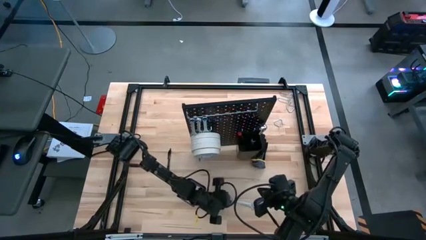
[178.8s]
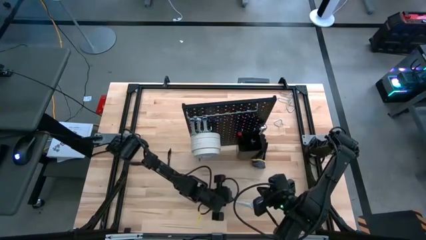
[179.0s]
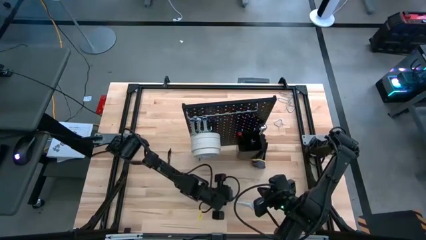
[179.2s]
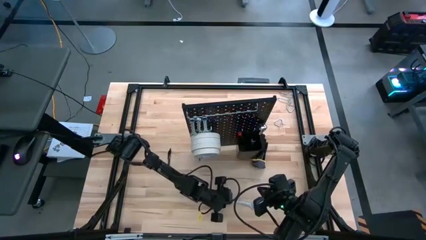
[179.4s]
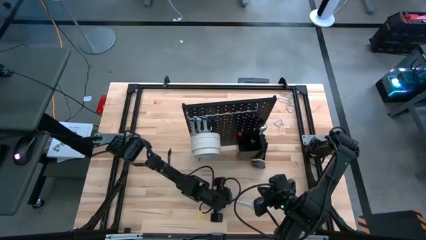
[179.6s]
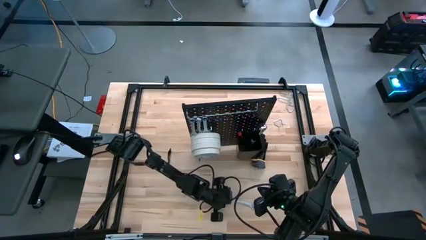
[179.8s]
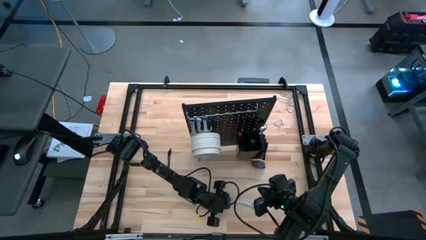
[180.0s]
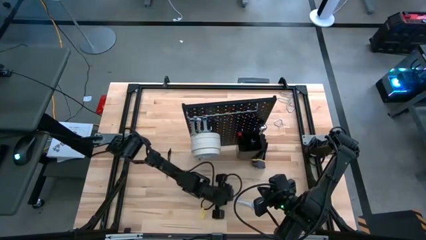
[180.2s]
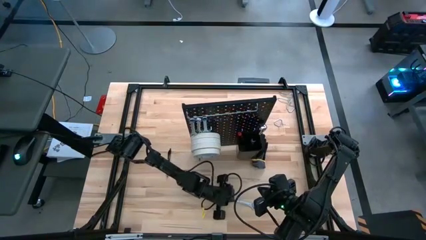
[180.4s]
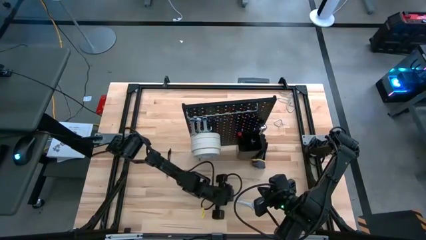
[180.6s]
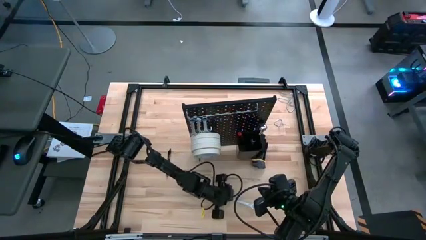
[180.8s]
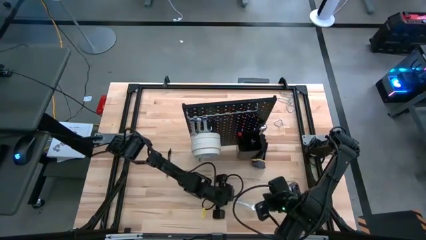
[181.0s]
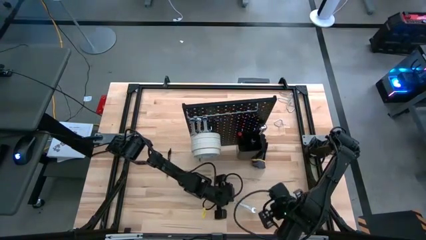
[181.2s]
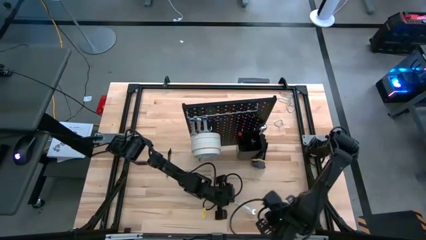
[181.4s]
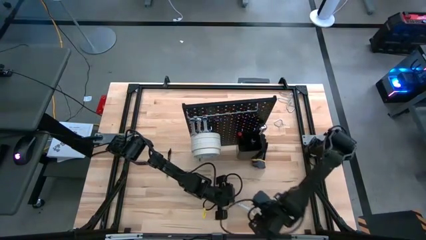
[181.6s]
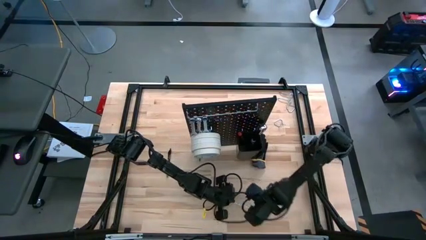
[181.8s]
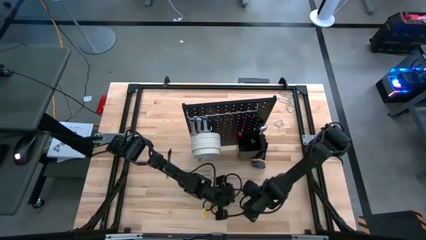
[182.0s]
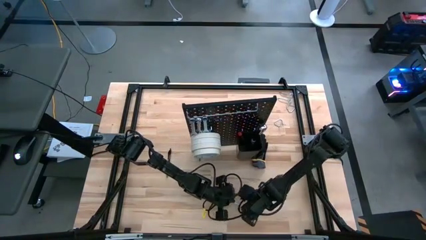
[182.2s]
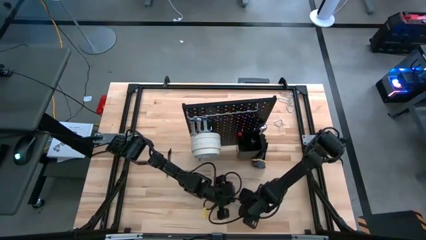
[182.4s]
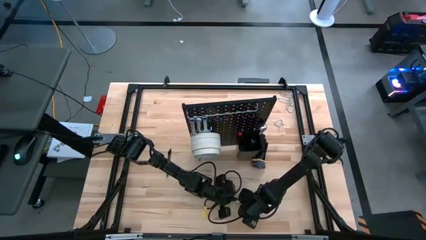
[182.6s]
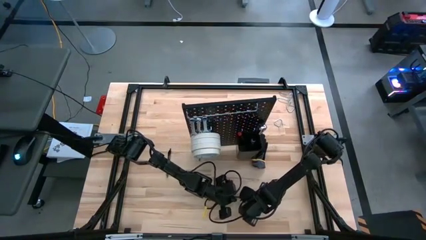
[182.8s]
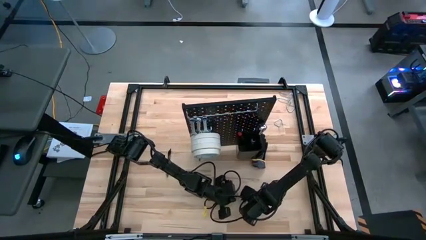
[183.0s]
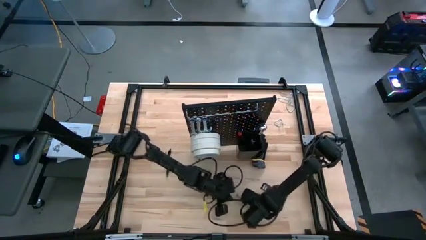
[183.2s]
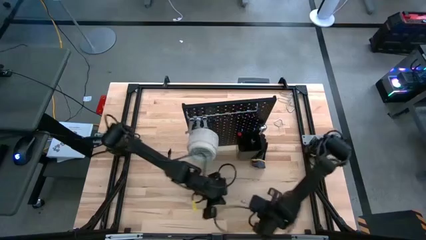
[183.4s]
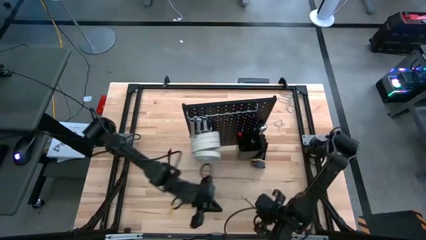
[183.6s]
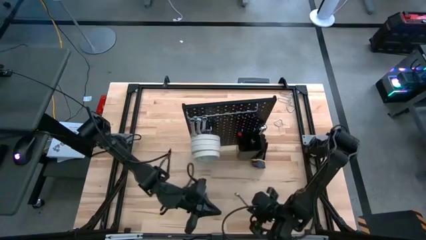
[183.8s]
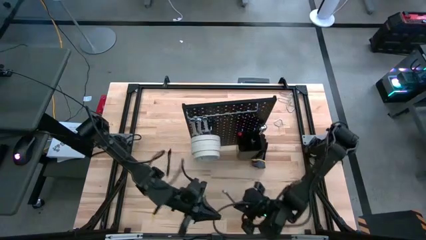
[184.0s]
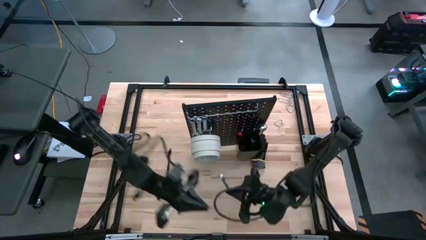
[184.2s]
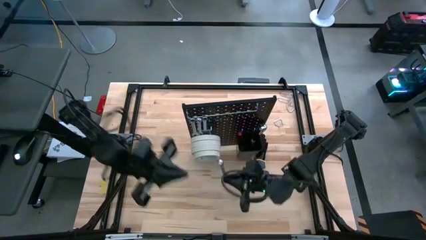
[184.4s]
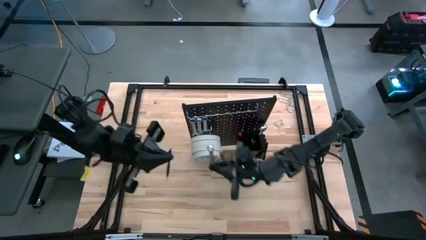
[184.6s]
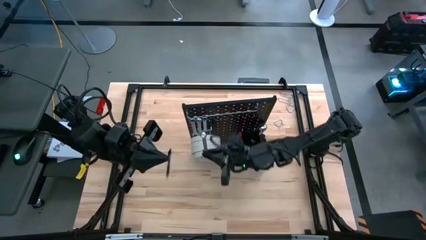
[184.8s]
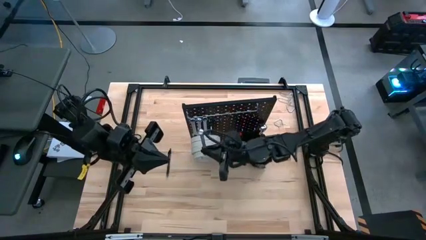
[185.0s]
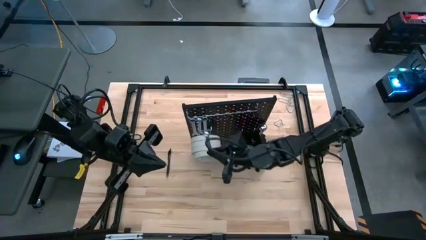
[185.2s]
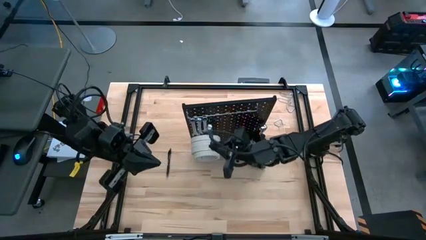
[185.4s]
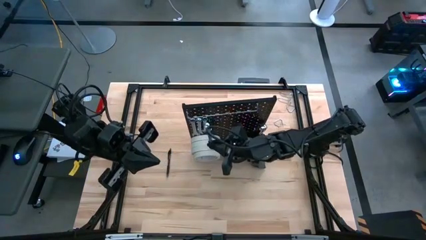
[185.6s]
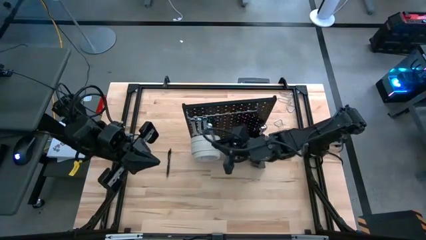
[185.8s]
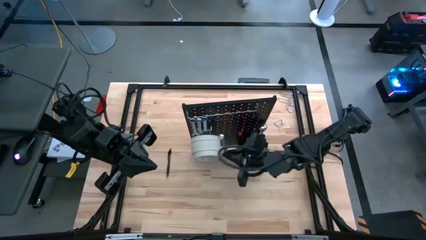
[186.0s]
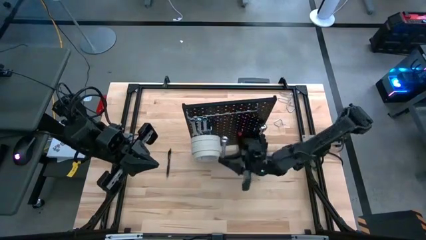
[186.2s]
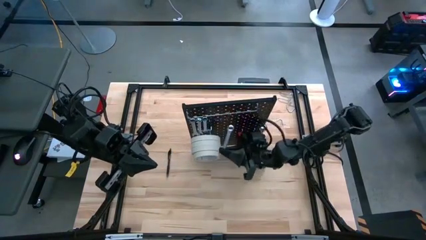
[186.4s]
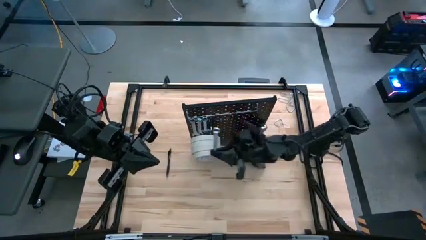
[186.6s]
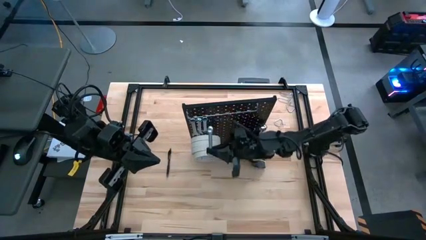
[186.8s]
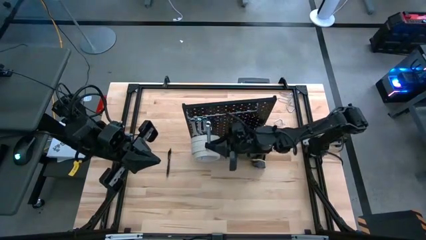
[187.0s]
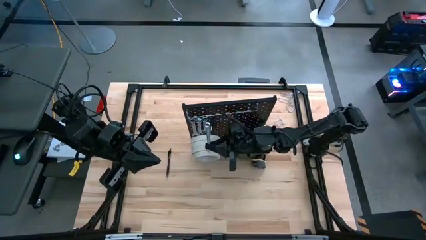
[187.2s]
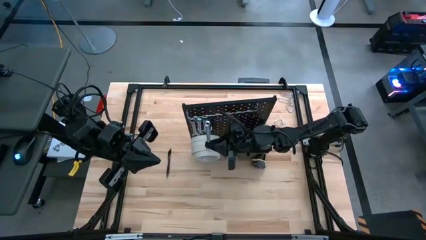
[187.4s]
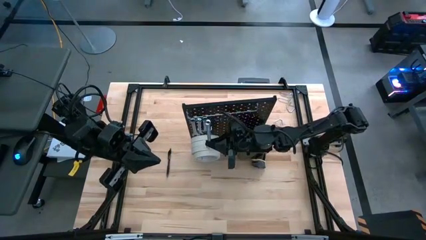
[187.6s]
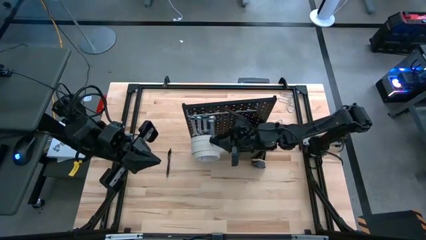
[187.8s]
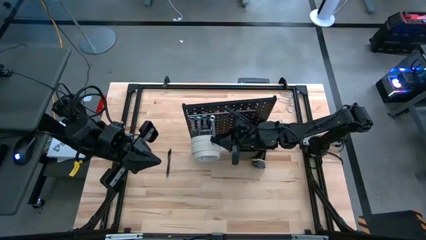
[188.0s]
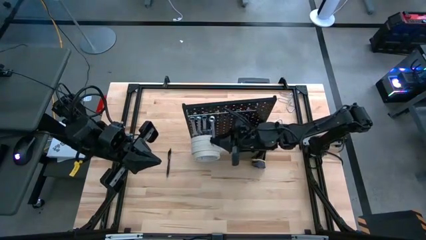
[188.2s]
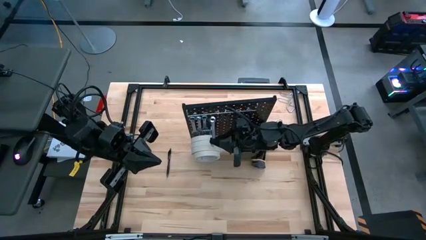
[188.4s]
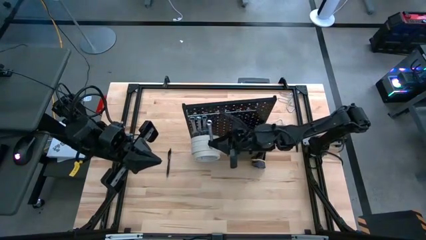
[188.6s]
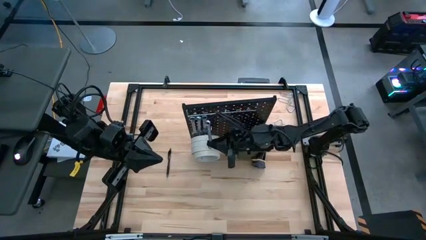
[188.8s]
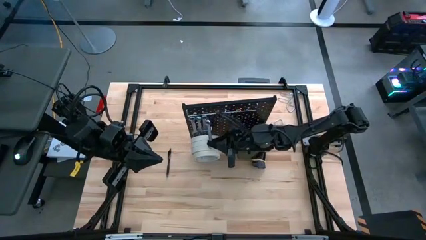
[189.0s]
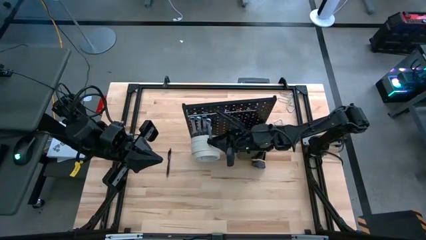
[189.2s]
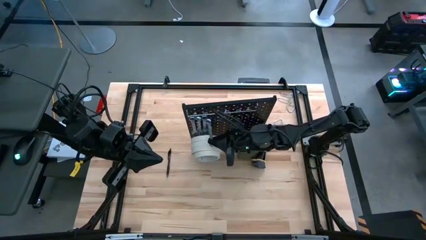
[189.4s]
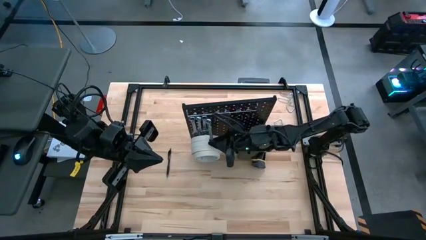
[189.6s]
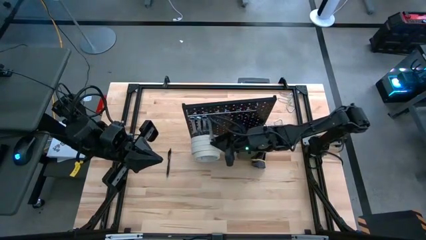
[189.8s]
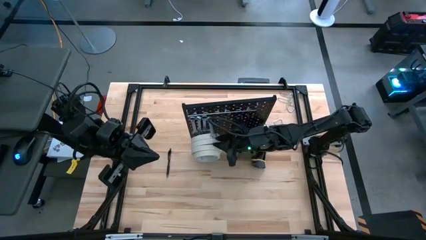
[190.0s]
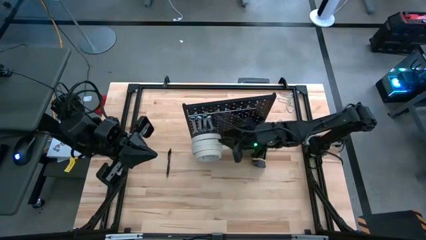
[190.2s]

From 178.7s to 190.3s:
Task: Hang tools onto peg board
Hang the 12 mm tool onto the pegboard aligned with the others

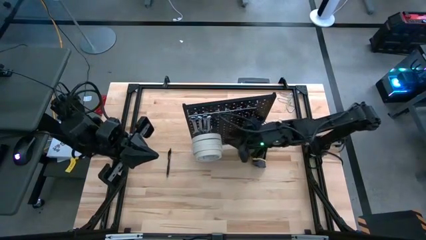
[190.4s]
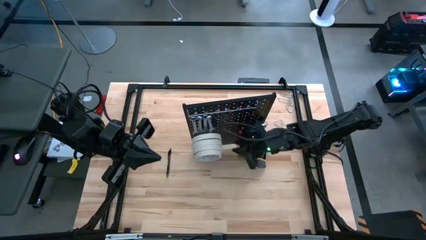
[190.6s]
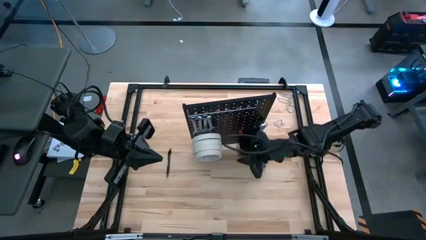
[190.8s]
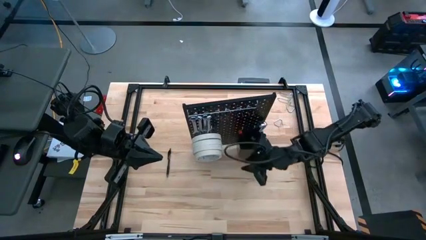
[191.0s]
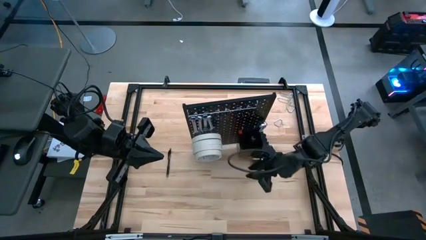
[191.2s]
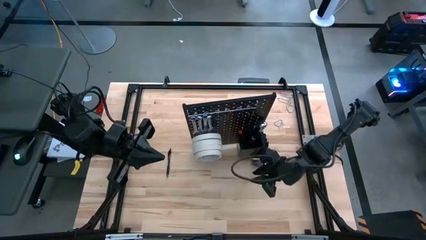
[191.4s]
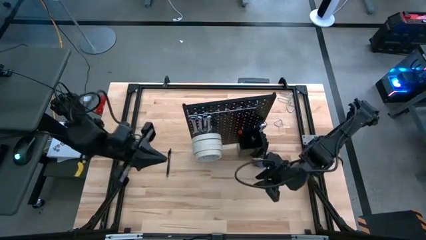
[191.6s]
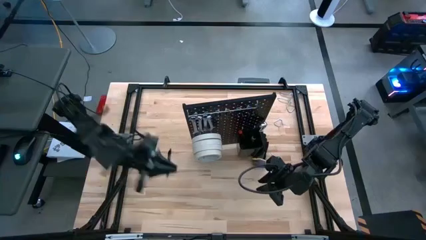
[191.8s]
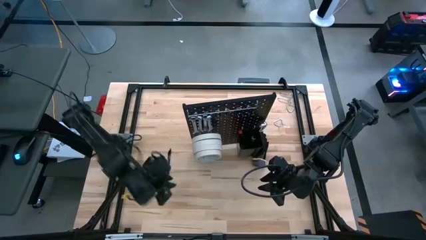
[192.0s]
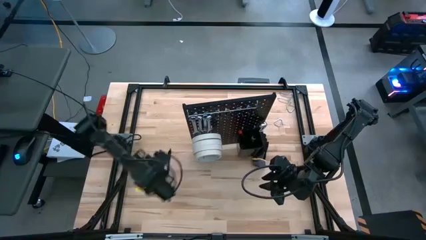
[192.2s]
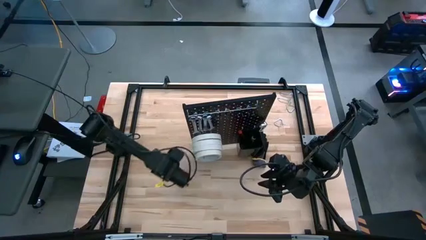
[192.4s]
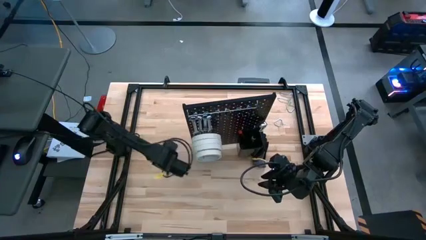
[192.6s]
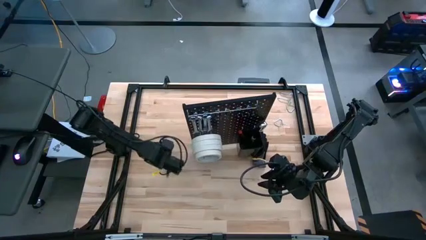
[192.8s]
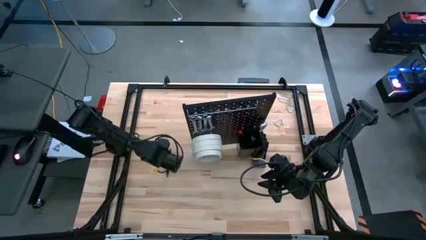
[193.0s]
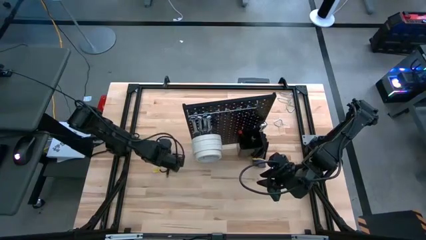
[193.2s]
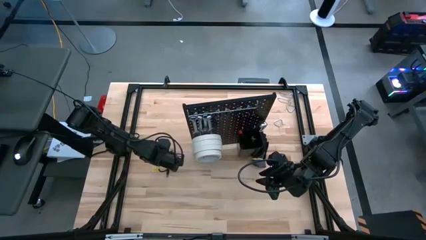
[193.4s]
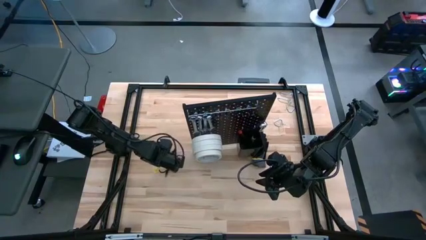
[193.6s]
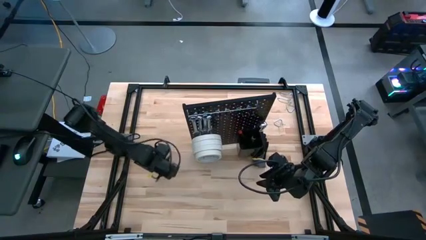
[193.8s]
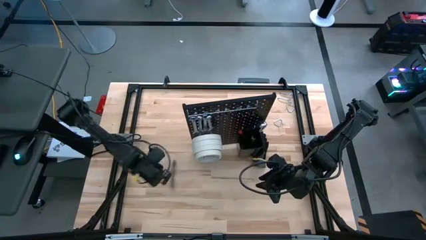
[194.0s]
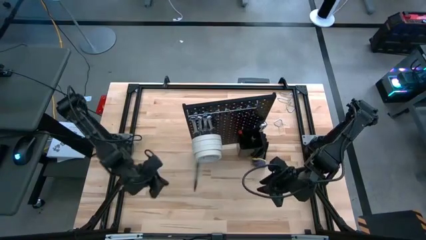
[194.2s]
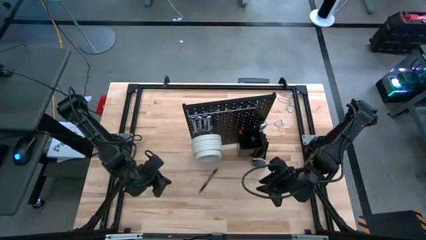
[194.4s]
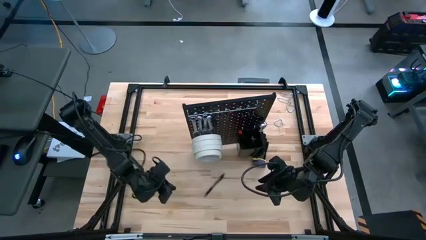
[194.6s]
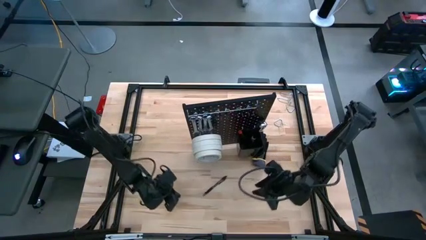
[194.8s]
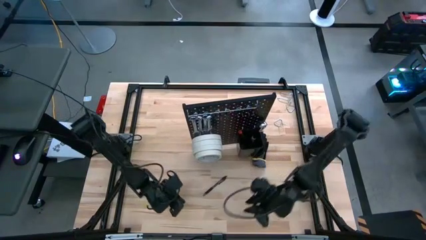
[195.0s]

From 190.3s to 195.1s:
Hang the black ballpoint pen onto the pegboard
